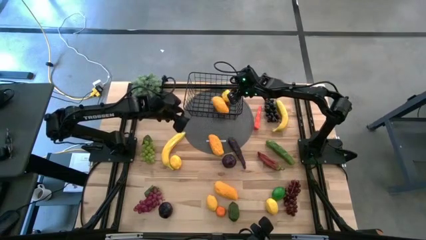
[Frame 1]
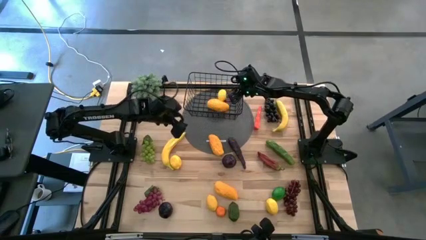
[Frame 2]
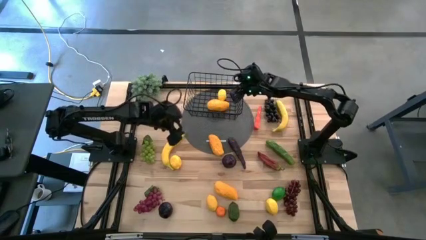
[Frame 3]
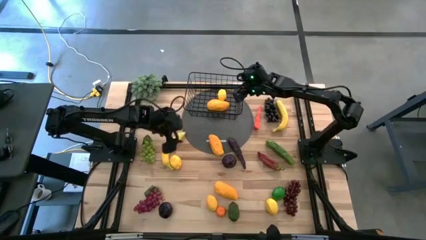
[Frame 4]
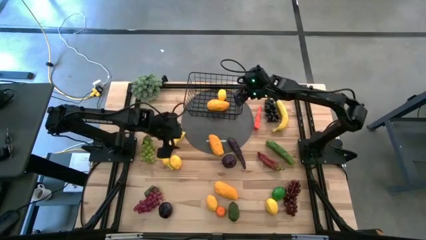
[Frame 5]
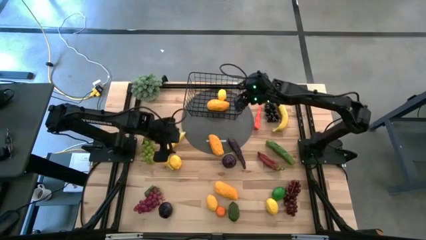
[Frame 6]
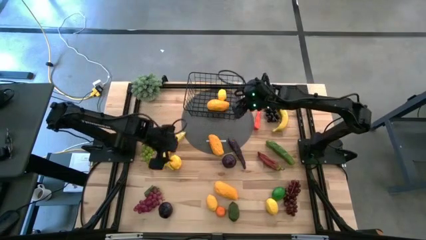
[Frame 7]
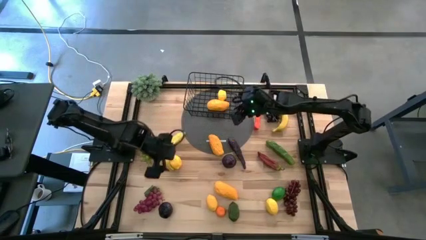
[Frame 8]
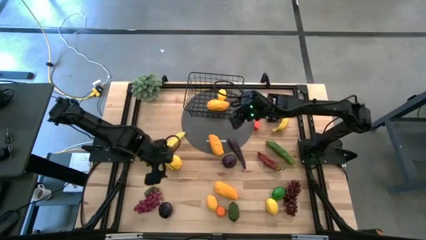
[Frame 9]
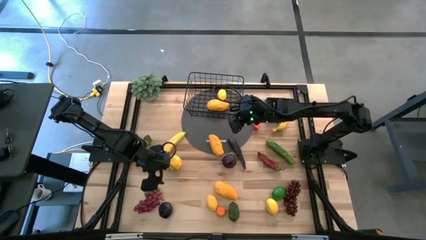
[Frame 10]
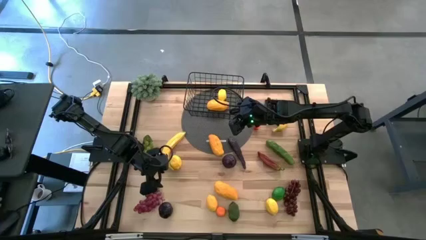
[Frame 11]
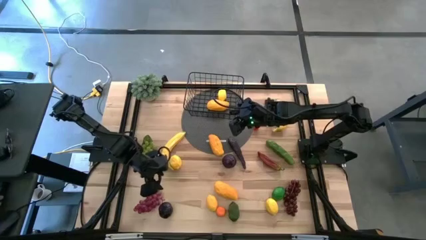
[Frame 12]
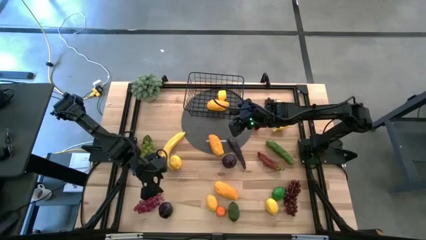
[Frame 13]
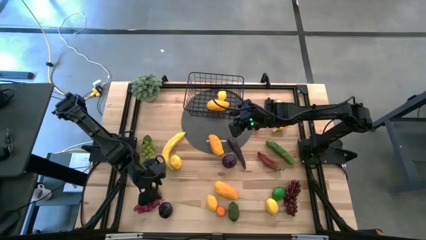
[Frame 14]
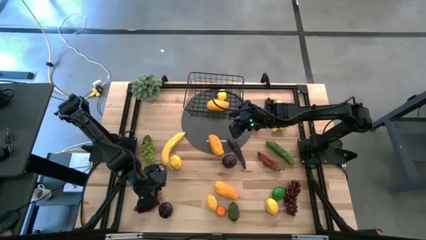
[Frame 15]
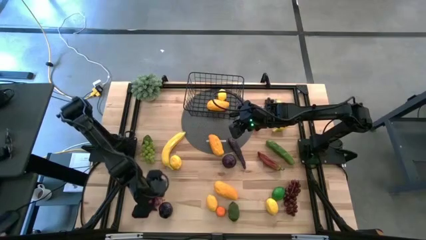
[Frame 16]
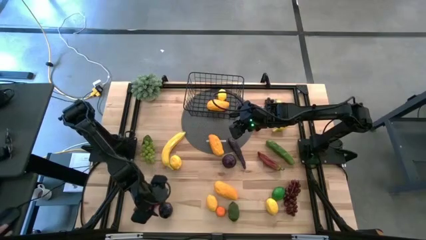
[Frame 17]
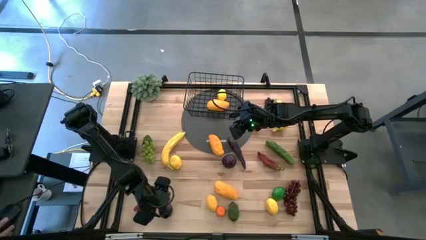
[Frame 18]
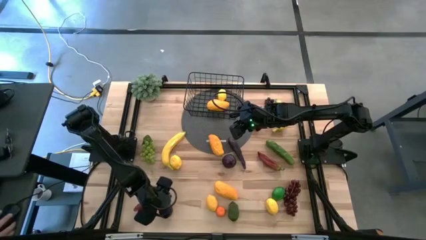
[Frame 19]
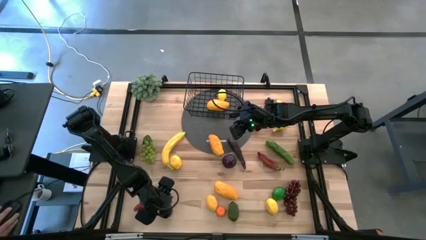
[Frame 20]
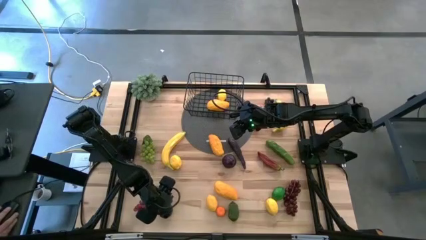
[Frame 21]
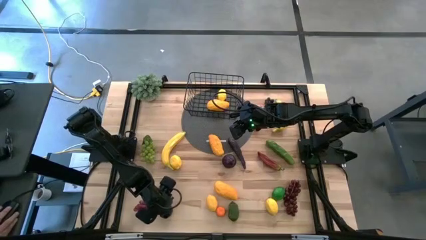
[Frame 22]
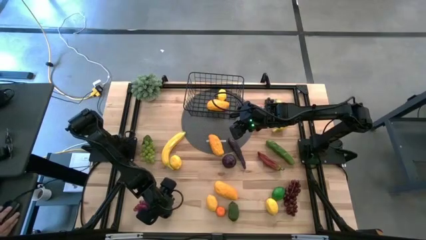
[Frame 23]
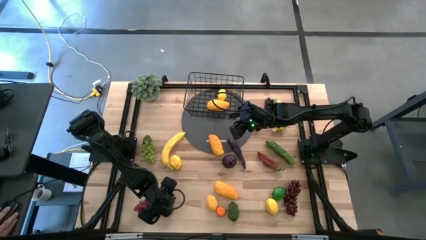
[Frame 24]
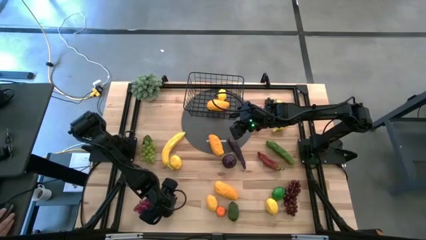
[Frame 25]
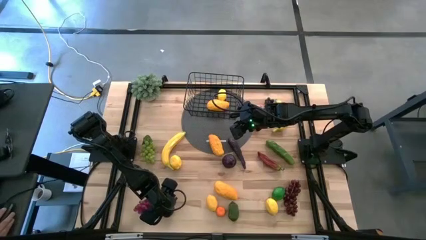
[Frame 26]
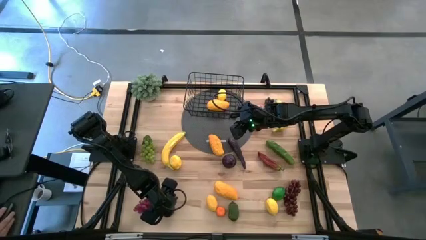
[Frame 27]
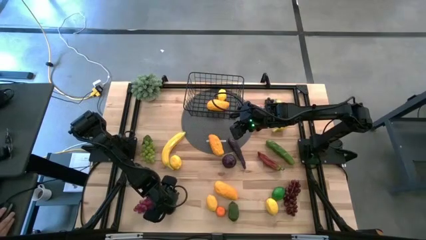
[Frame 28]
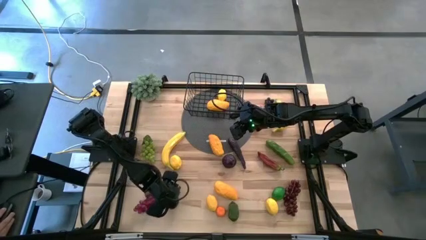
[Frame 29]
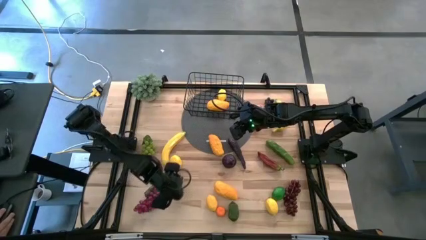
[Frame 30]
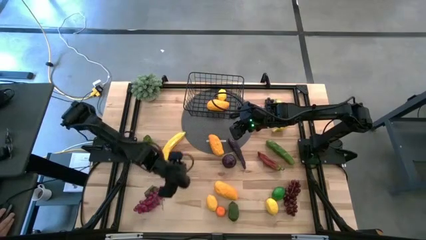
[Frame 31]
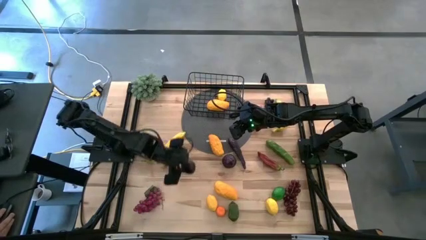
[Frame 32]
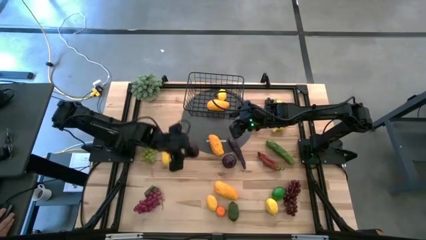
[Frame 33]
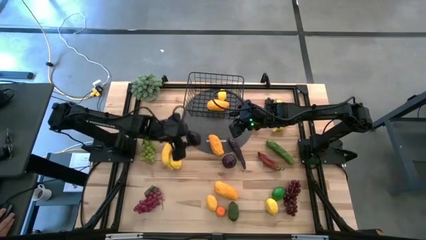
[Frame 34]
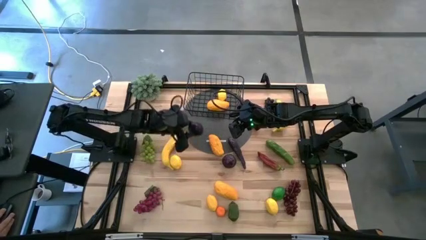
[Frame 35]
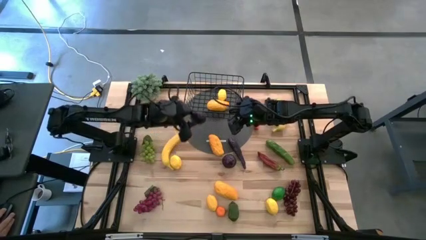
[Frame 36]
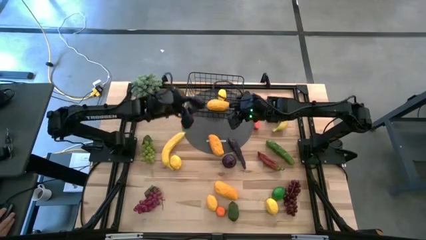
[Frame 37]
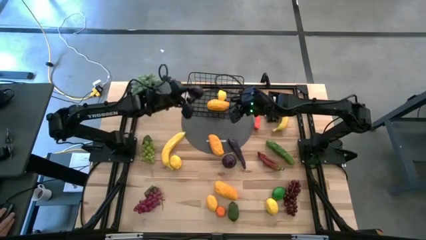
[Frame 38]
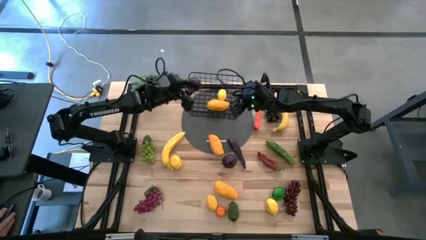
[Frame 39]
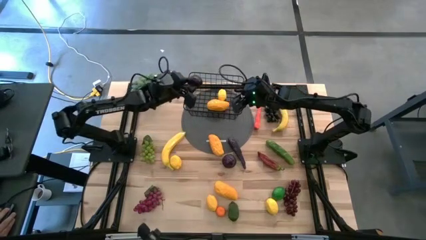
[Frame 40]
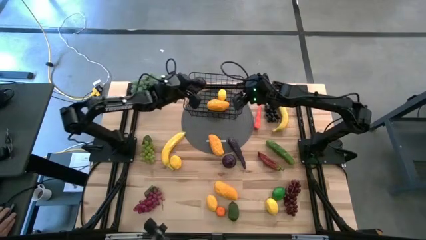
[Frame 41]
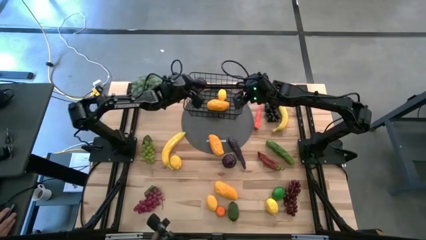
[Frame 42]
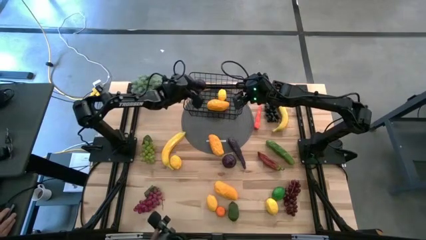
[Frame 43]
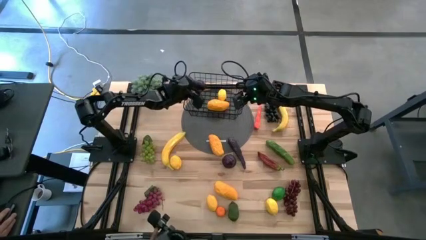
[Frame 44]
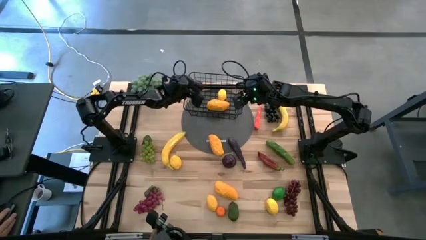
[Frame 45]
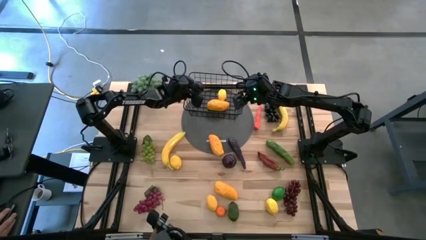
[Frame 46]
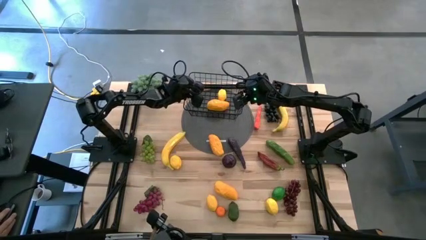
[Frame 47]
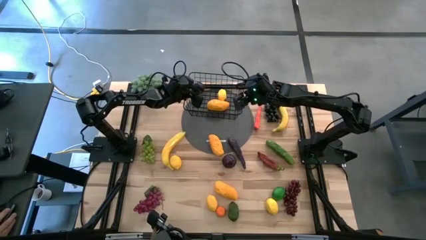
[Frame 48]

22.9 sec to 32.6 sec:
Task: Build produce basket
Put the plum into the black wire basket

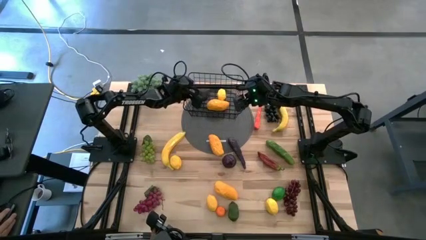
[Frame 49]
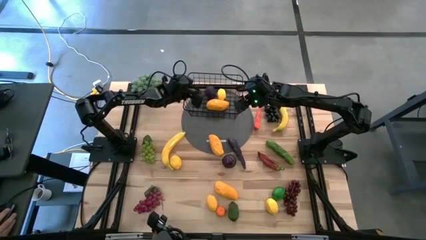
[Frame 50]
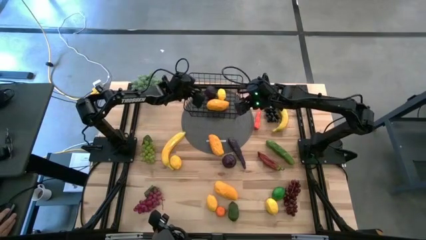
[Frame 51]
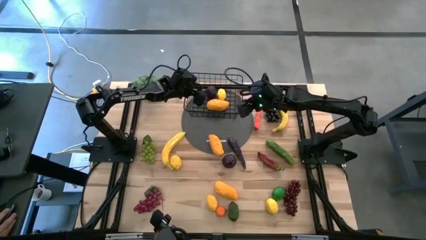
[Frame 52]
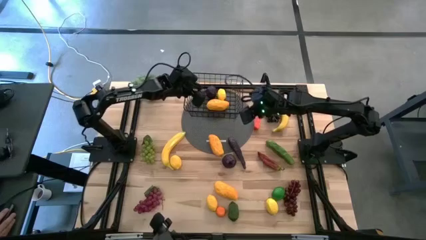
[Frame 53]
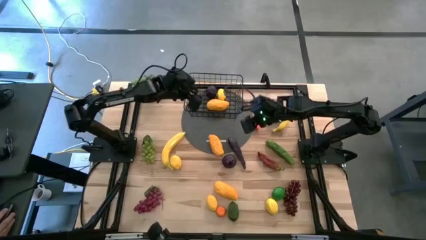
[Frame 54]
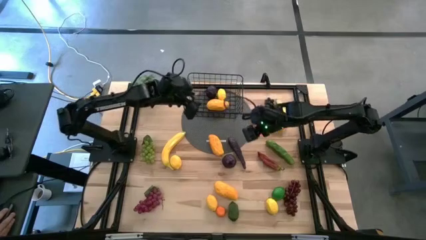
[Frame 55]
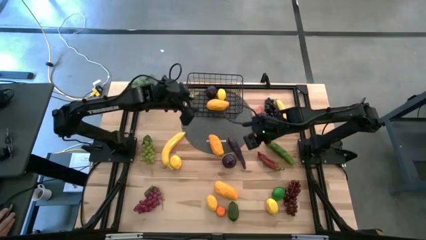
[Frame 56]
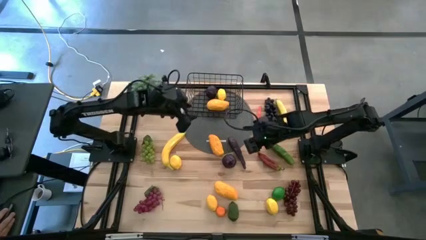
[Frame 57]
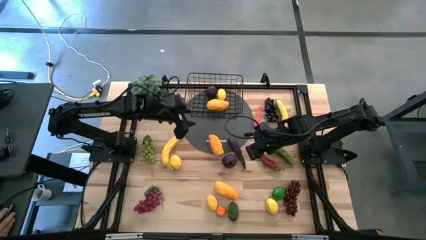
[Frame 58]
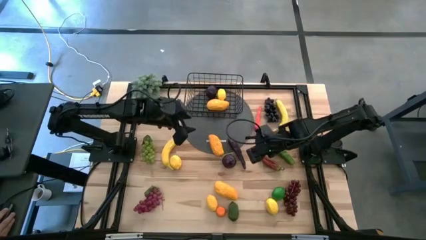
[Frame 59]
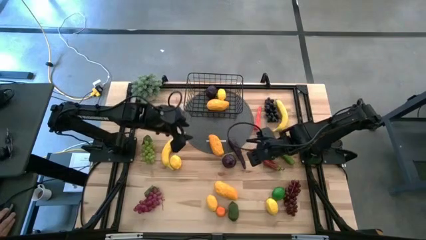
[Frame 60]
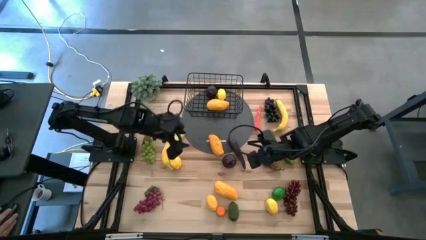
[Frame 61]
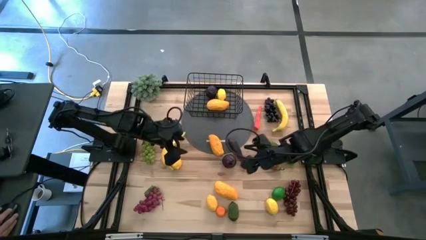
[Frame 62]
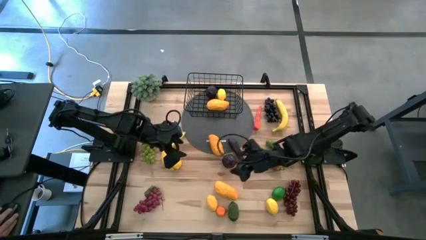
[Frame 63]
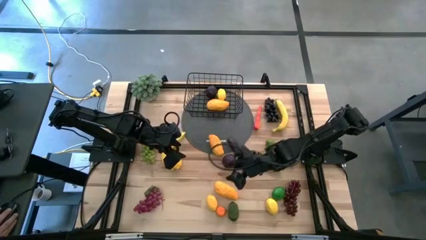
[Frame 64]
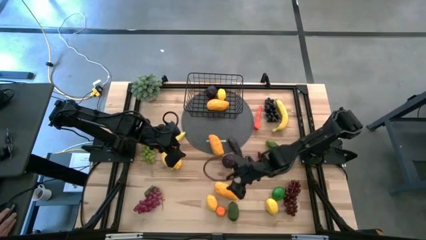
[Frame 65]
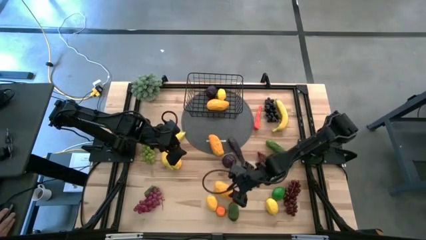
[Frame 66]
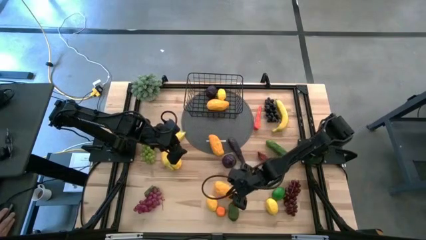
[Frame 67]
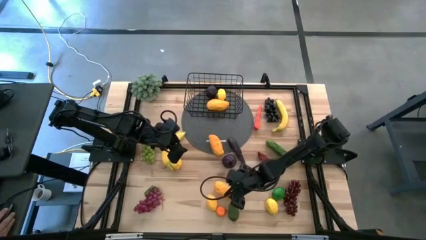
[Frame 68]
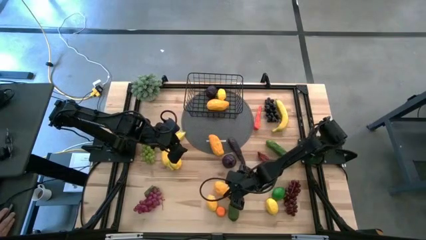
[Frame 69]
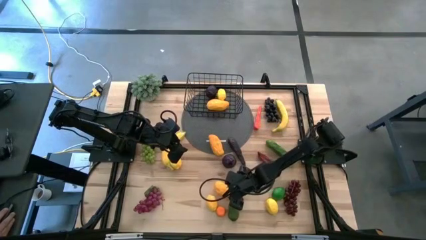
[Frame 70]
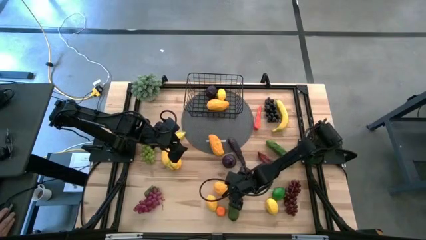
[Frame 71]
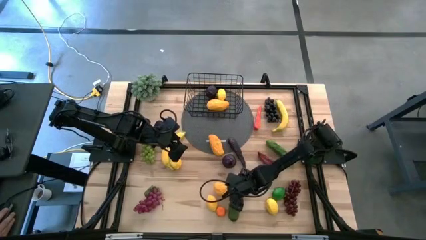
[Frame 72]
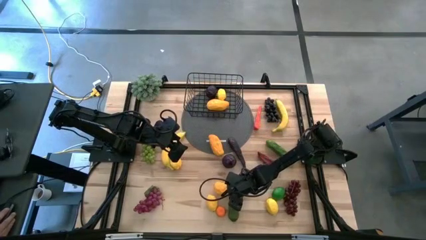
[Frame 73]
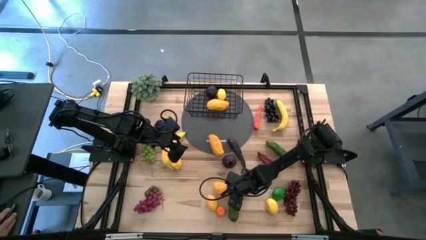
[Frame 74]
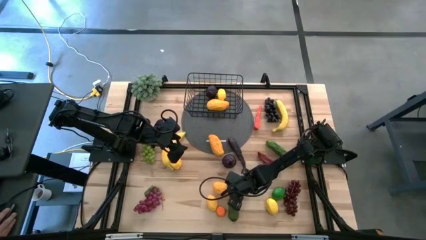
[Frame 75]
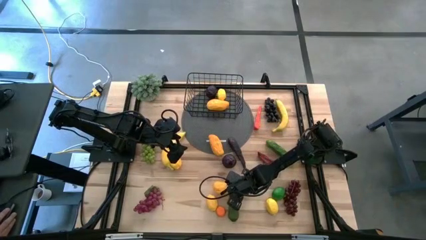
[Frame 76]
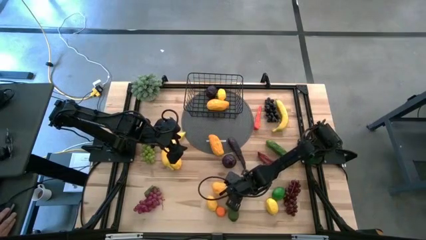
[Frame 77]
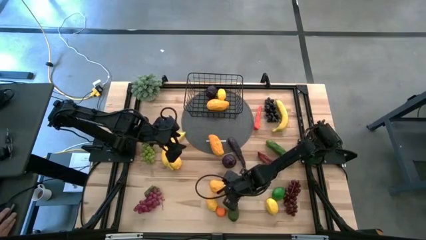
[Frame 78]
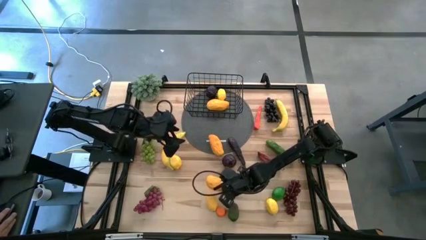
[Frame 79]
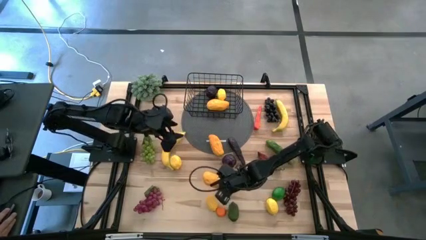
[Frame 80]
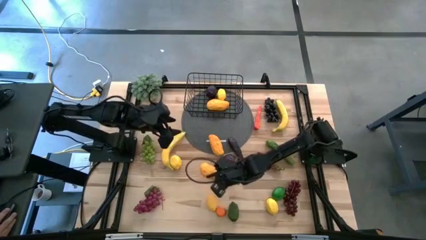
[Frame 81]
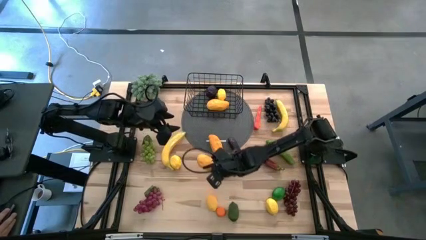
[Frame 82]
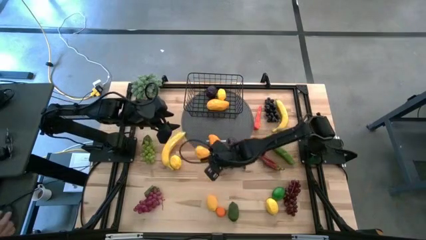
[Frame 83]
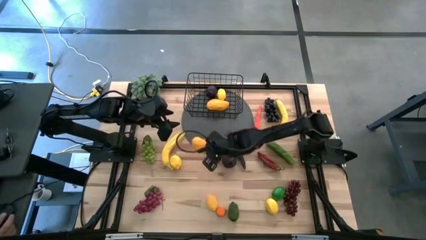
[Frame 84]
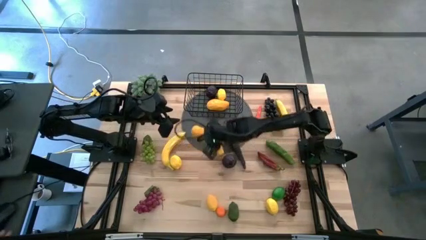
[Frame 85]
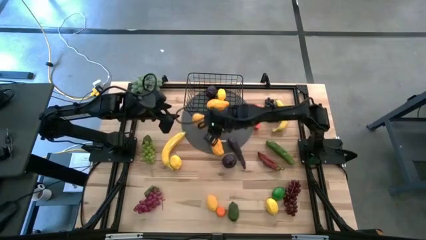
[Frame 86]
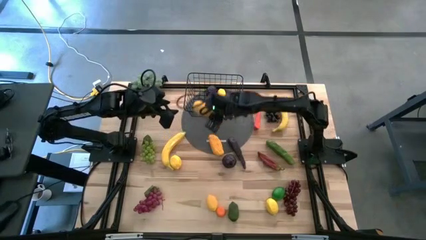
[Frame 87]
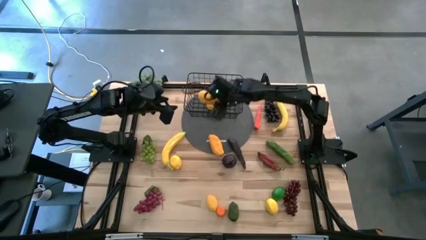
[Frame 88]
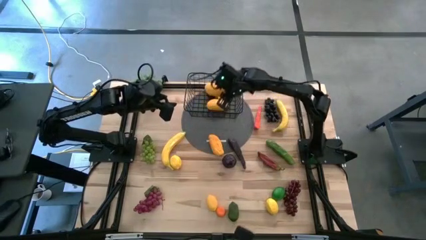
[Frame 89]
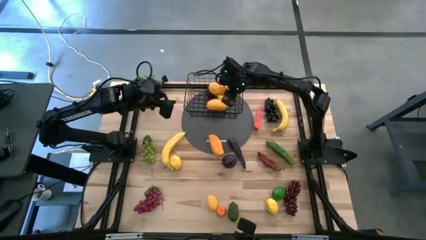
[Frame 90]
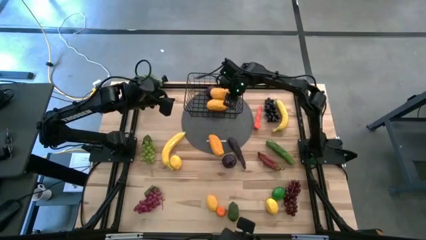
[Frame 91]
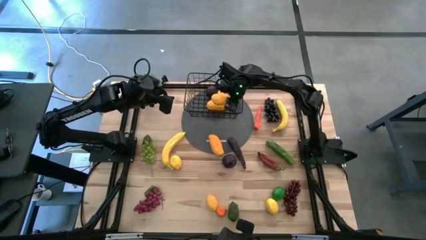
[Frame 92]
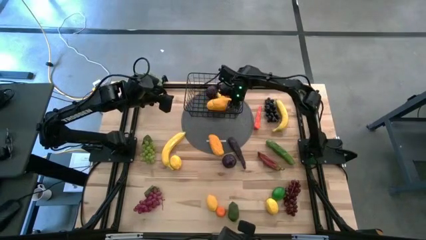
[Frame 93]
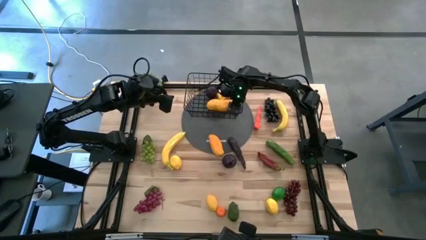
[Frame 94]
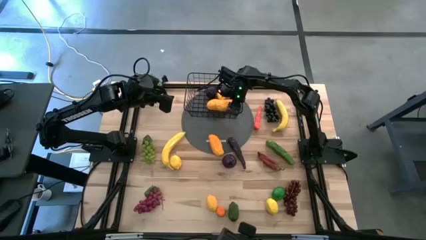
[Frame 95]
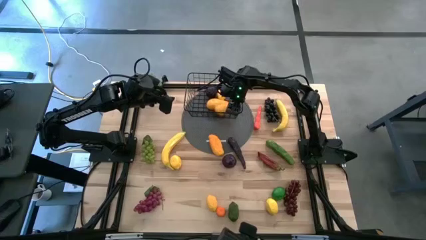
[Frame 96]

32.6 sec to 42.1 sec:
Put the mango into the black wire basket
